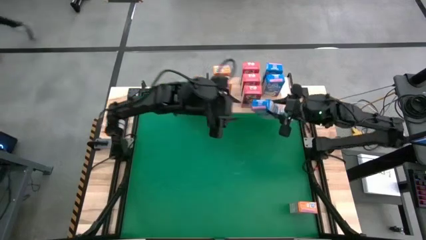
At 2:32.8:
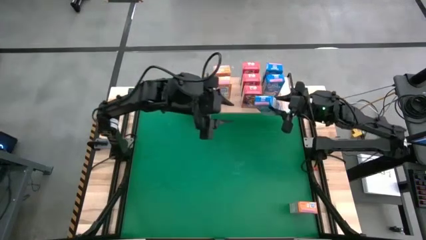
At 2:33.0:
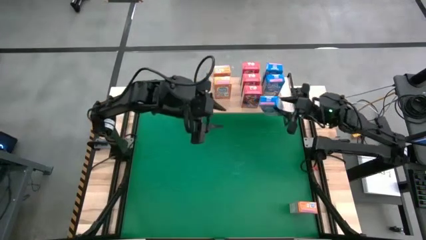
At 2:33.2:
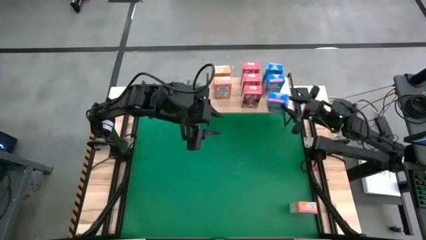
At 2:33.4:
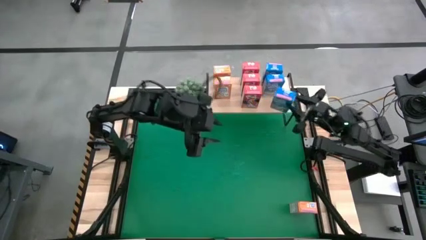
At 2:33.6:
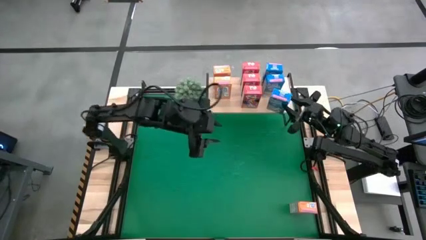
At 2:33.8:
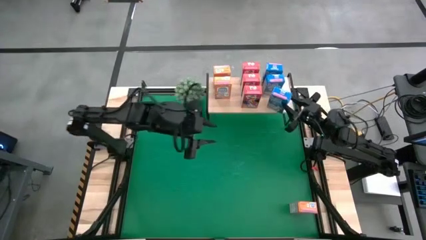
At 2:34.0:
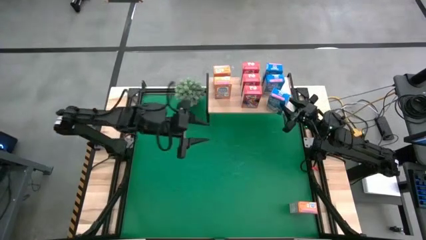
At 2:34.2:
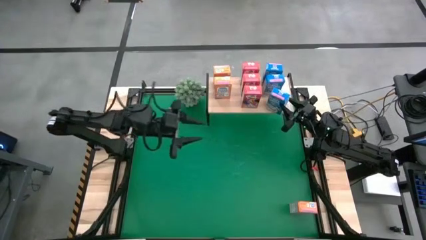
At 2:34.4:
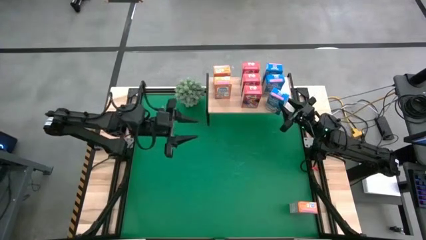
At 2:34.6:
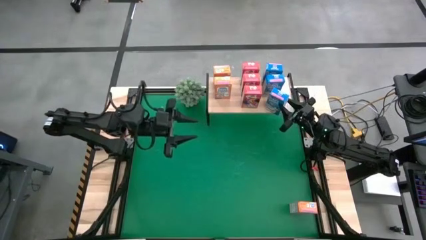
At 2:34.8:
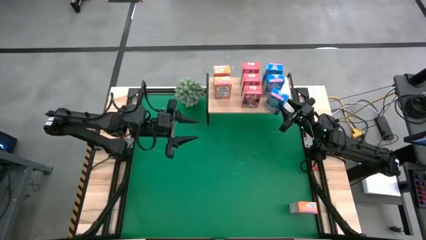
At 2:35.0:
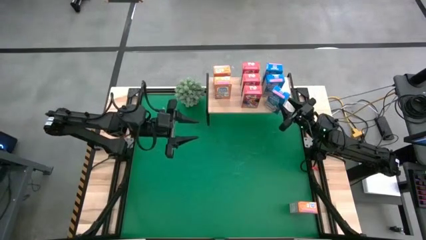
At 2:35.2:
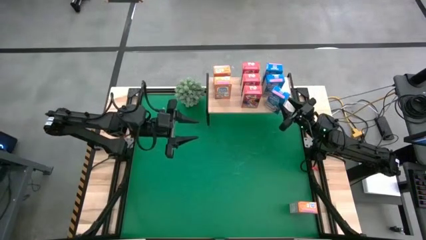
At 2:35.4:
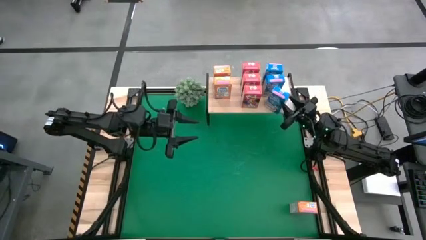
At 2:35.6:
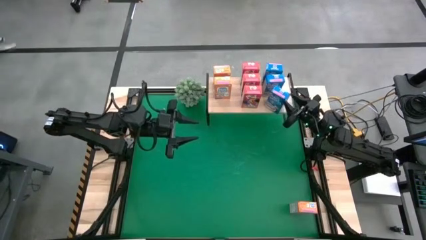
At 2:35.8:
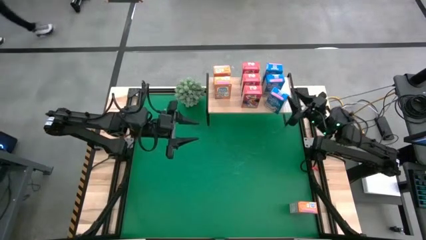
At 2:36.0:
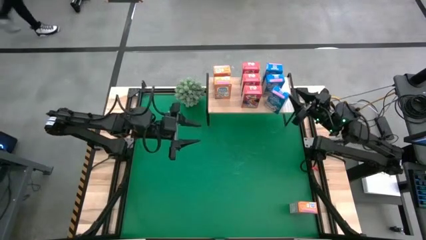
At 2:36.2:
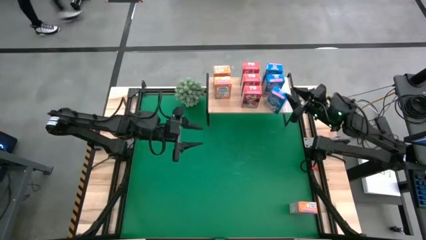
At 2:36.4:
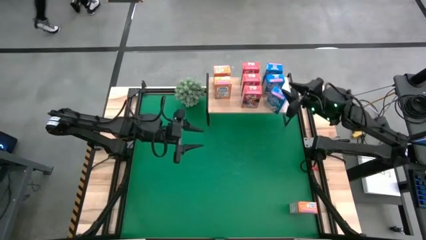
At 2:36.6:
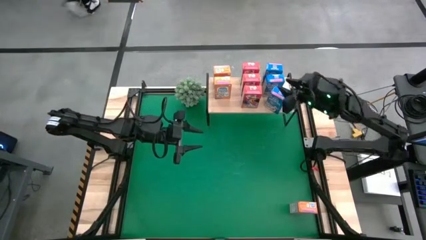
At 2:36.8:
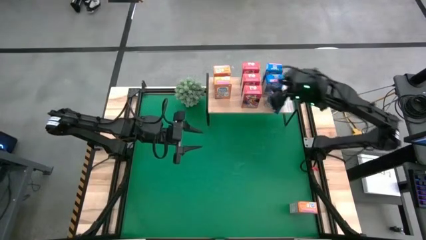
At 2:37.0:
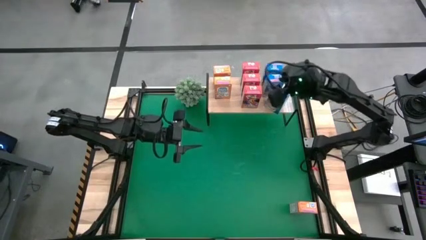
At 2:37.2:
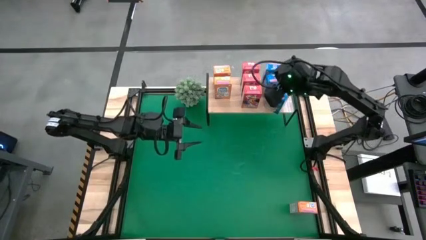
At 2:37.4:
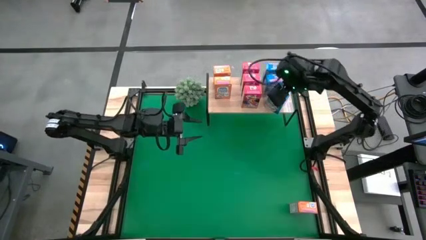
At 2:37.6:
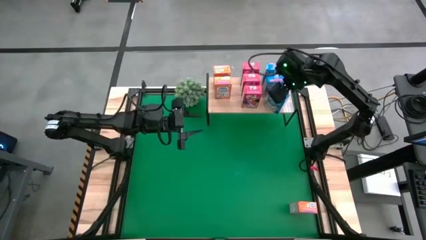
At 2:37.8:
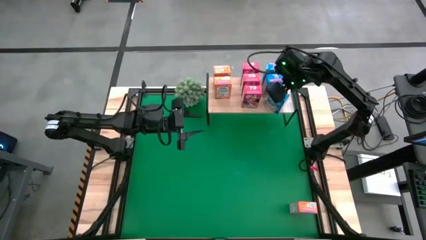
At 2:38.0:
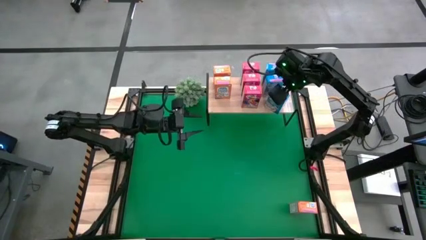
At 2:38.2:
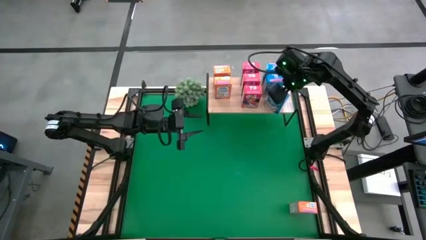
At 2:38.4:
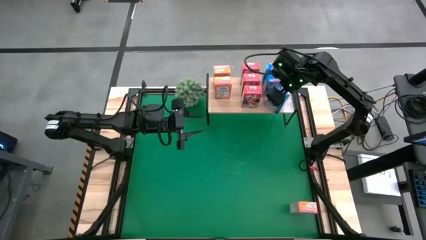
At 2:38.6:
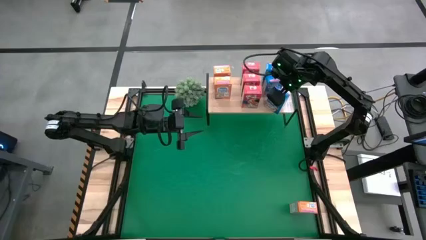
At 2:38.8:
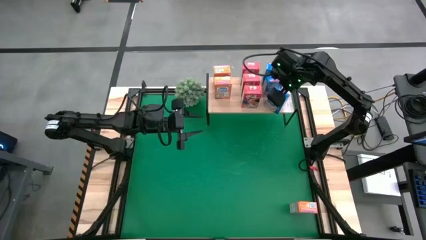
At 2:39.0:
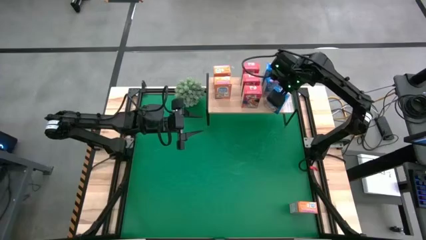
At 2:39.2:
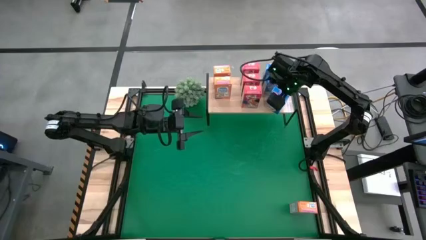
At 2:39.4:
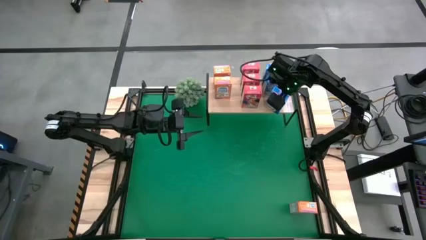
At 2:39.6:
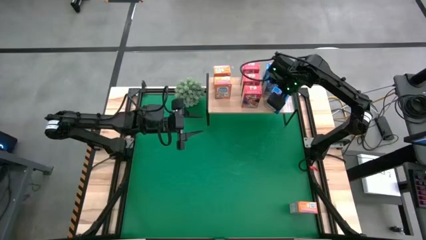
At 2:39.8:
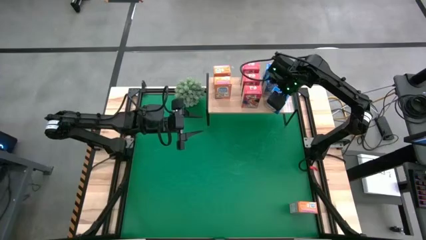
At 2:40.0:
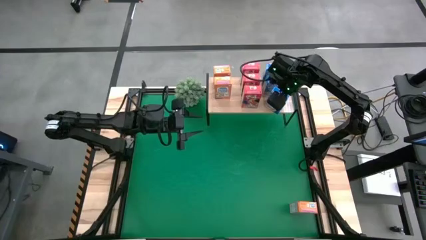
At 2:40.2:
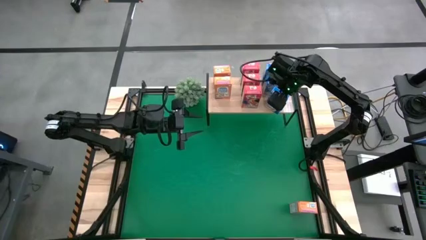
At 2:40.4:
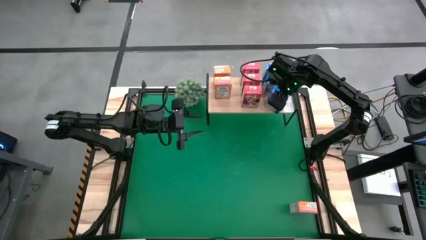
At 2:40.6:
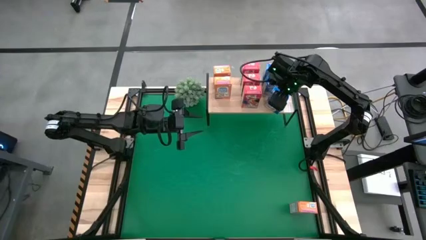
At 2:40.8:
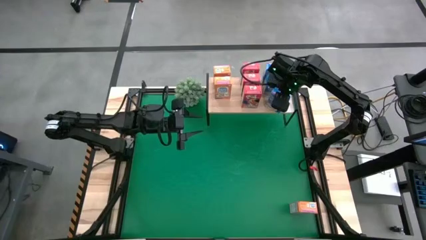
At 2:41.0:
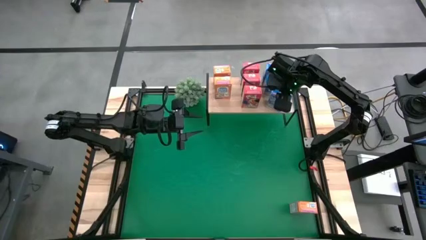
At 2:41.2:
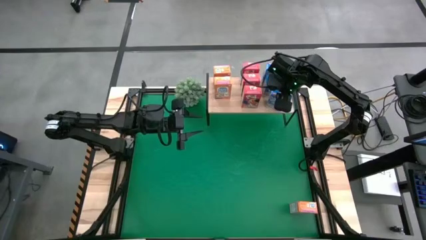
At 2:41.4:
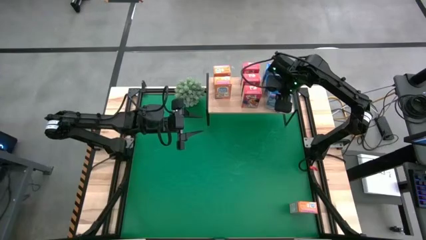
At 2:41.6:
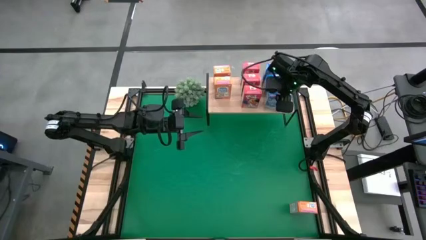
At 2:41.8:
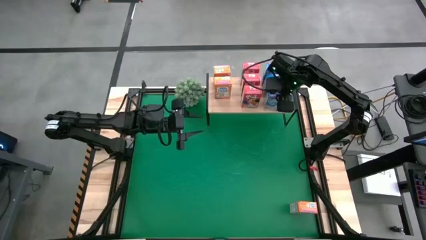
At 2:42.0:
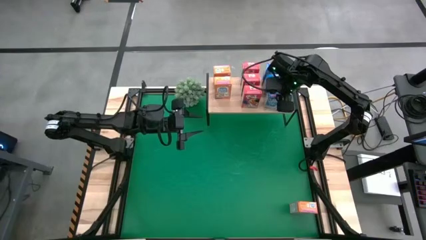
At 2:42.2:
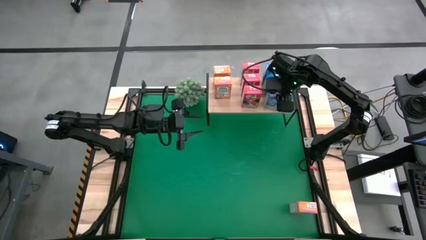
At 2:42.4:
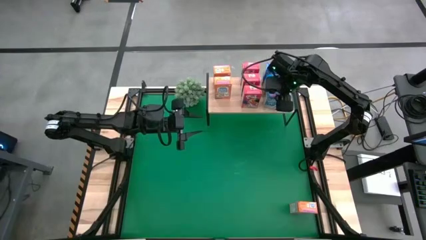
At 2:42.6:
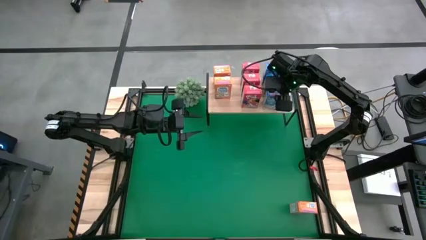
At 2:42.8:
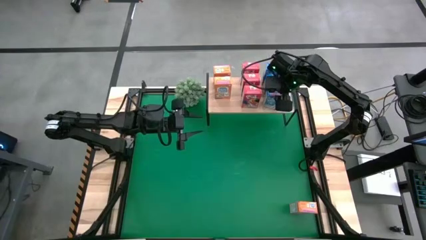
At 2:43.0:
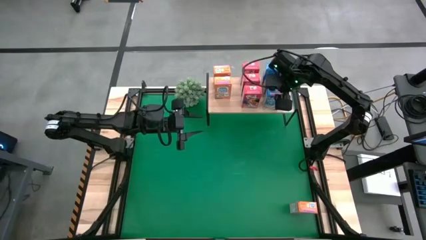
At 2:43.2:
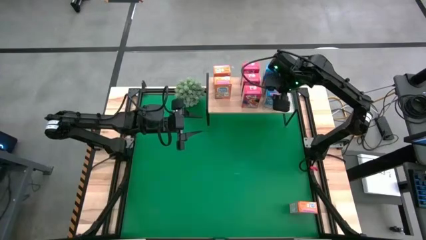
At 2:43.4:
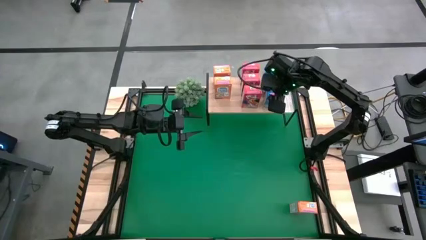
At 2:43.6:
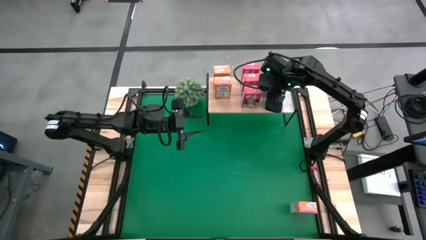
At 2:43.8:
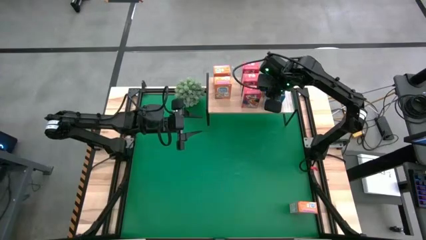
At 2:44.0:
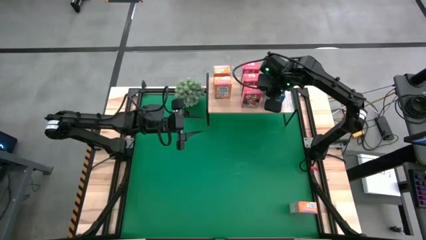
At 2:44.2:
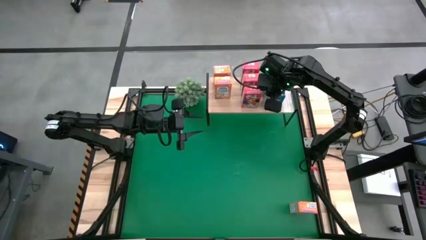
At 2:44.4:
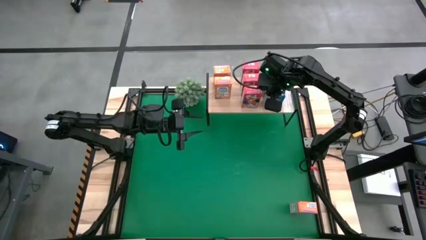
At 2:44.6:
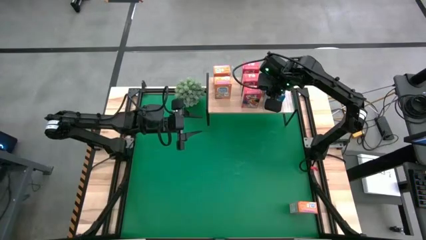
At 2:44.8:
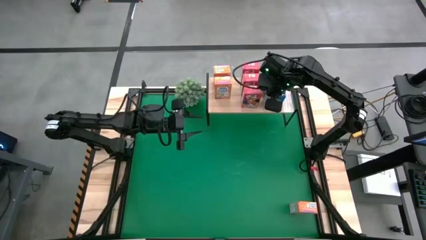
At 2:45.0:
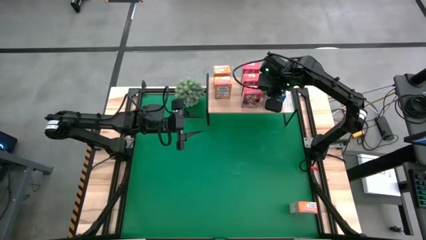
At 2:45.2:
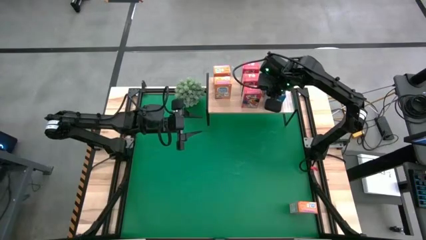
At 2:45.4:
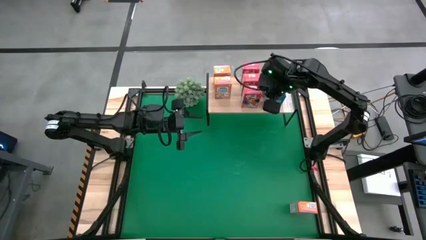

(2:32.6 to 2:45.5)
Task: Stack cereal on shelf
Put the blue cereal box on the shelf aligned with the other blue cereal box

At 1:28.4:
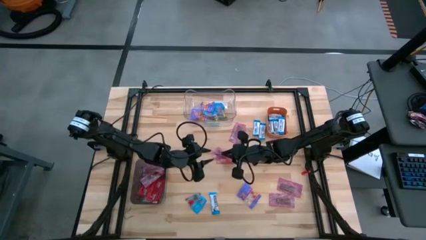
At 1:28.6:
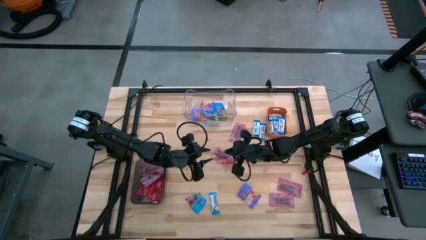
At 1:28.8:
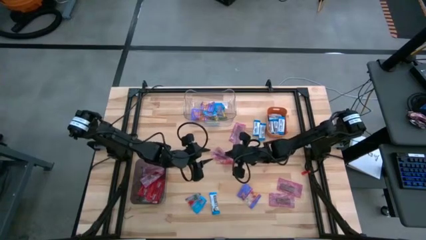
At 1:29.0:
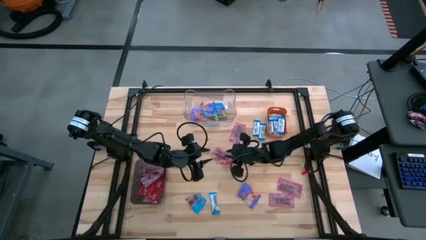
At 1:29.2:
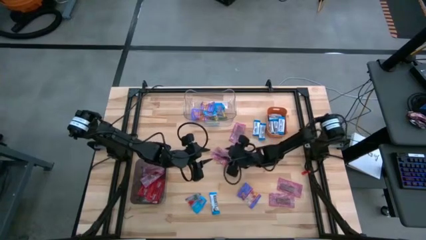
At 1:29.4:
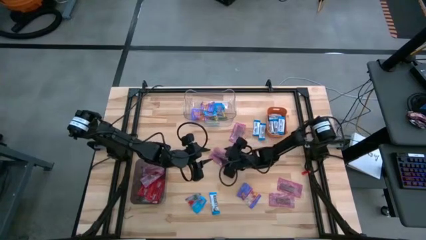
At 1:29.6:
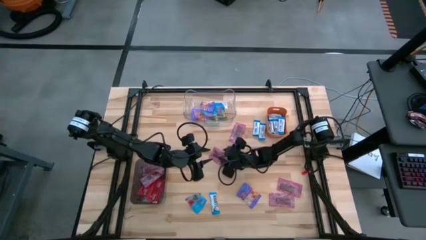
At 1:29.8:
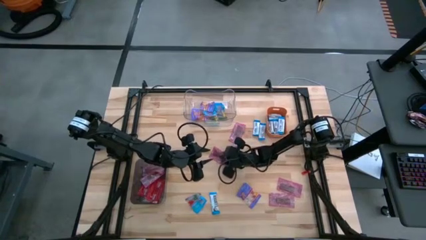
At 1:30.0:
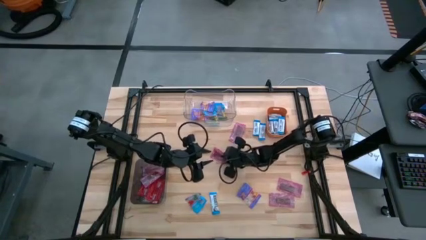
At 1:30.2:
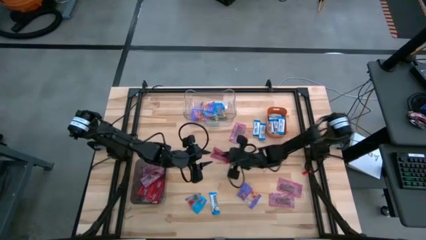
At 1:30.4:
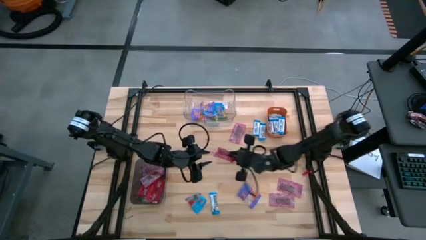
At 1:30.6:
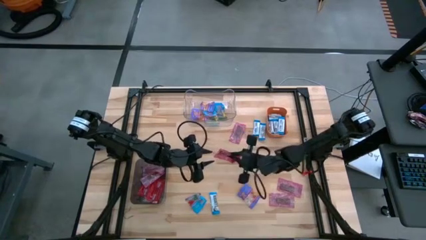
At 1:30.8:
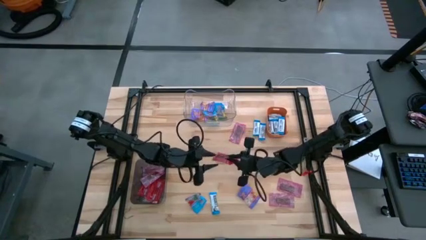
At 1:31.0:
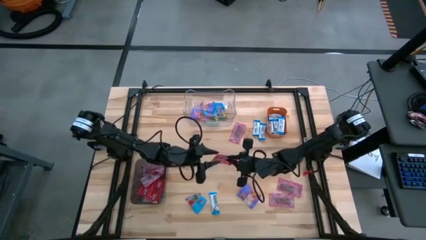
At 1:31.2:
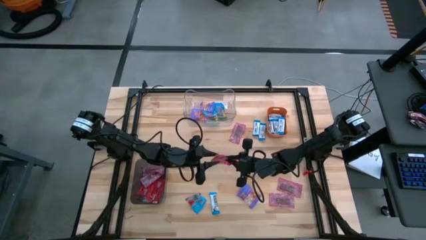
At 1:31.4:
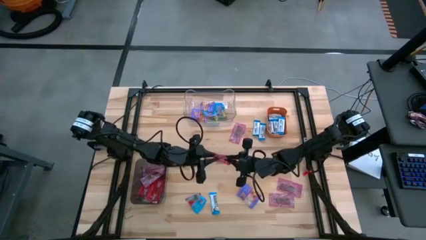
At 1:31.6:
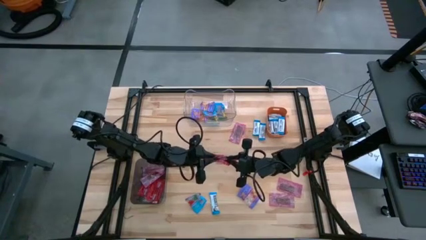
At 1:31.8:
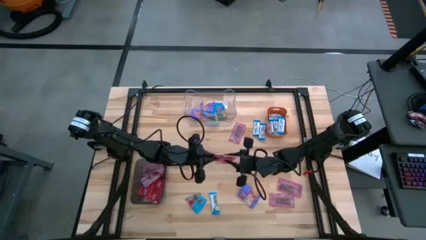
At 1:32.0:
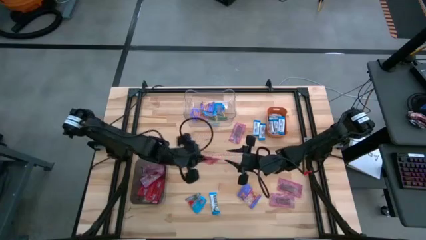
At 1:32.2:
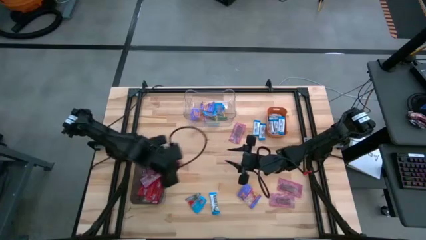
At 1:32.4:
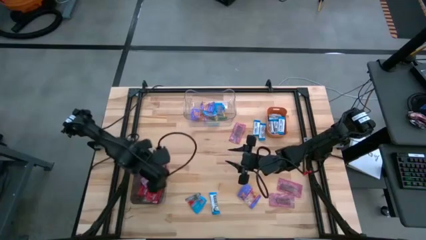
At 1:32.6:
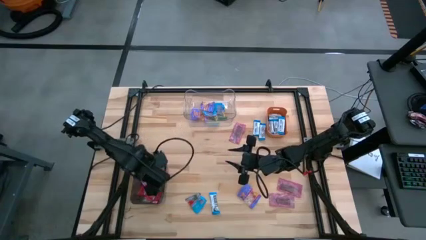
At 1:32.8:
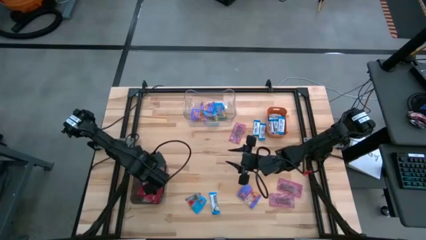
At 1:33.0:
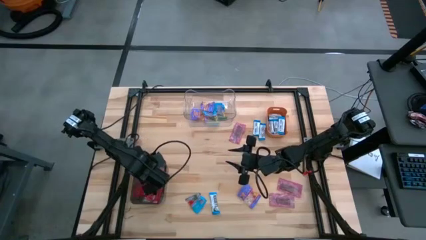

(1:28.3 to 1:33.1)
Task: Sort candy
Put the red candy into the black bin
